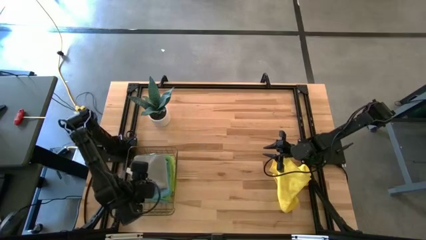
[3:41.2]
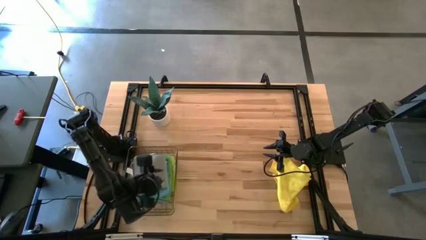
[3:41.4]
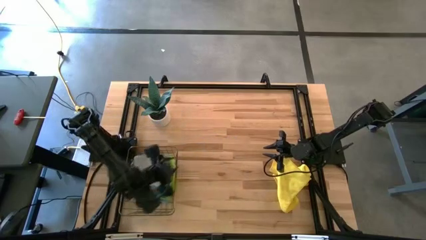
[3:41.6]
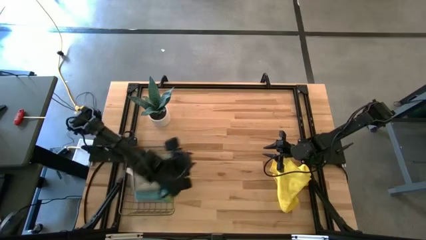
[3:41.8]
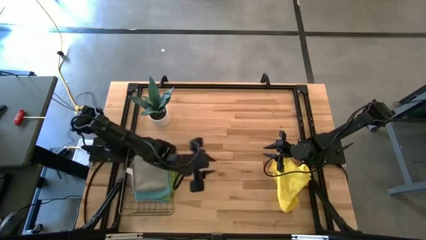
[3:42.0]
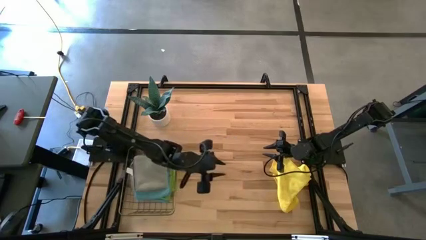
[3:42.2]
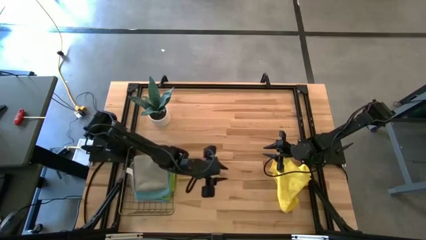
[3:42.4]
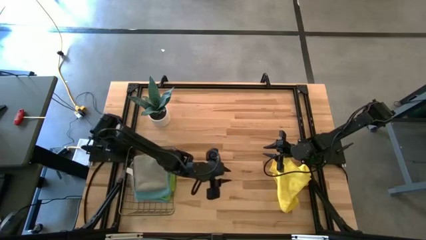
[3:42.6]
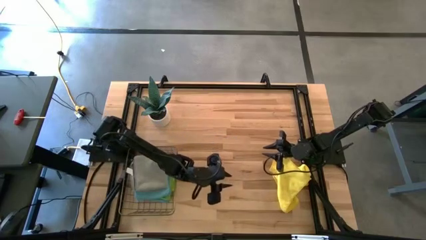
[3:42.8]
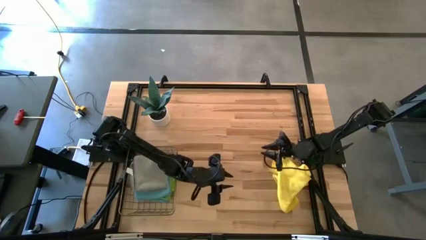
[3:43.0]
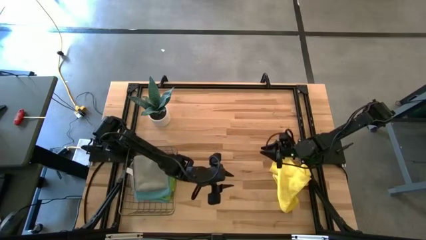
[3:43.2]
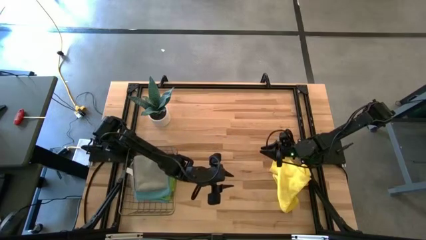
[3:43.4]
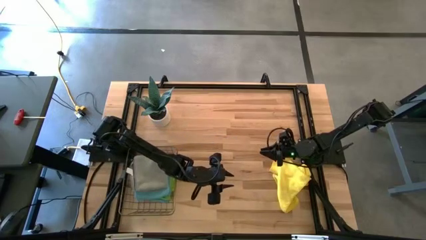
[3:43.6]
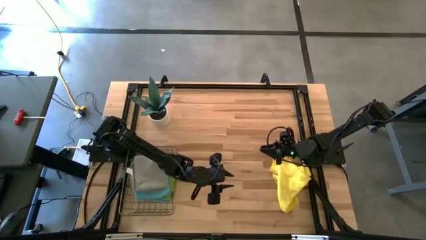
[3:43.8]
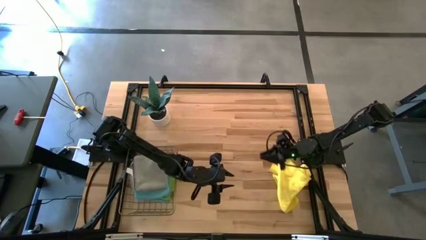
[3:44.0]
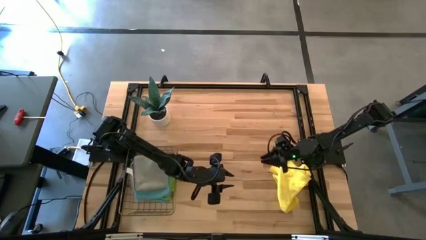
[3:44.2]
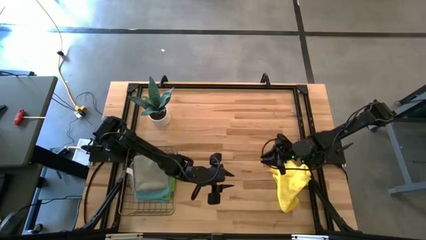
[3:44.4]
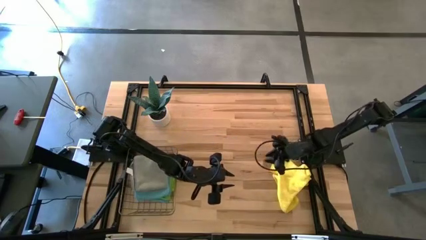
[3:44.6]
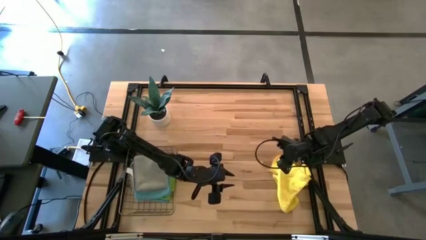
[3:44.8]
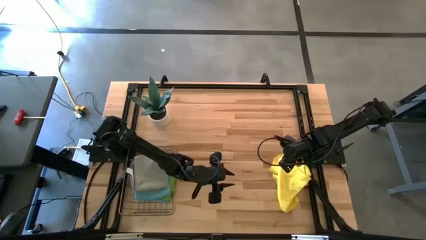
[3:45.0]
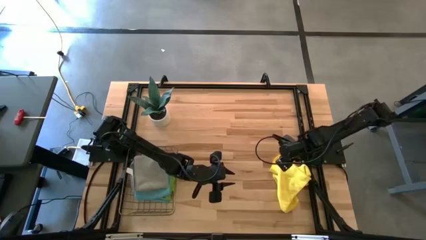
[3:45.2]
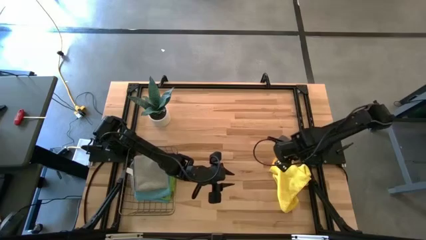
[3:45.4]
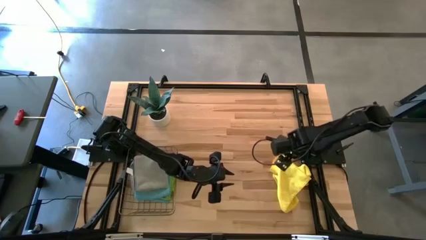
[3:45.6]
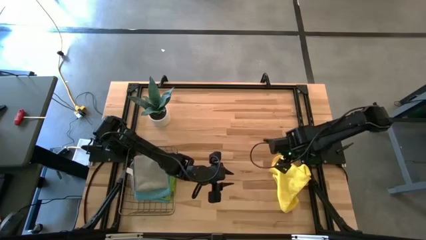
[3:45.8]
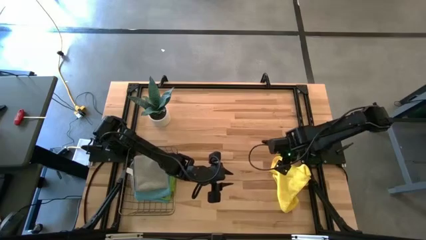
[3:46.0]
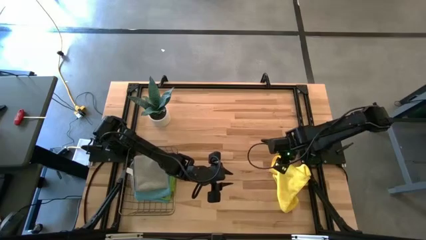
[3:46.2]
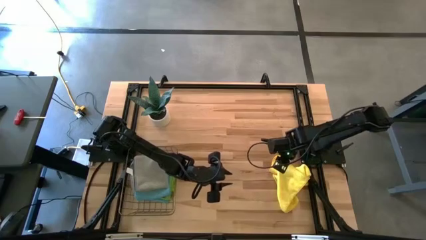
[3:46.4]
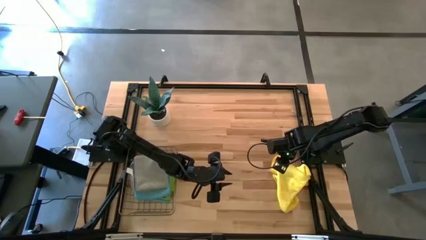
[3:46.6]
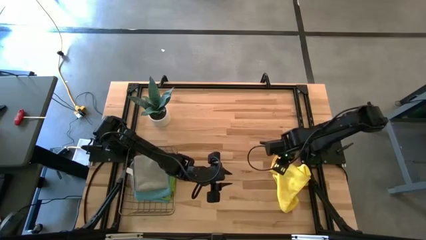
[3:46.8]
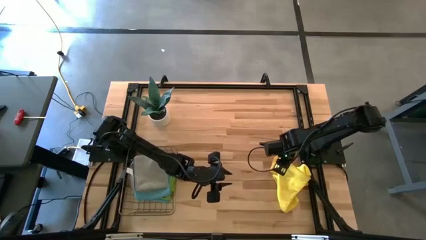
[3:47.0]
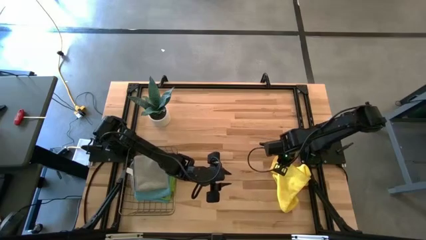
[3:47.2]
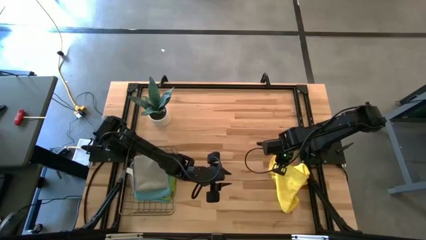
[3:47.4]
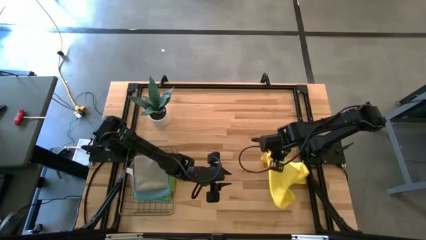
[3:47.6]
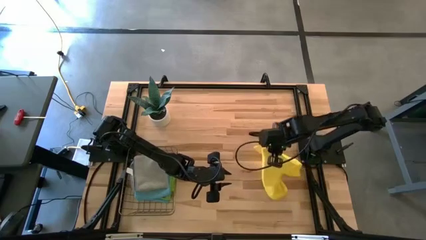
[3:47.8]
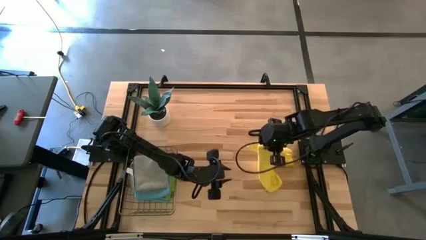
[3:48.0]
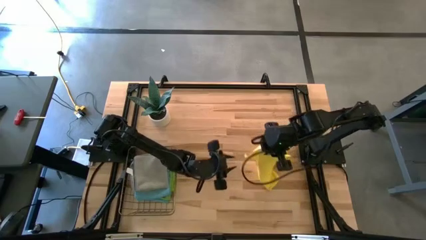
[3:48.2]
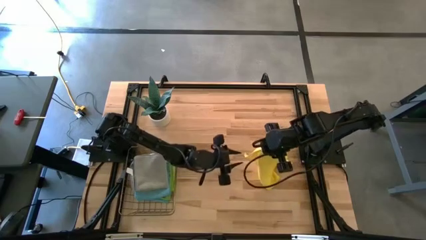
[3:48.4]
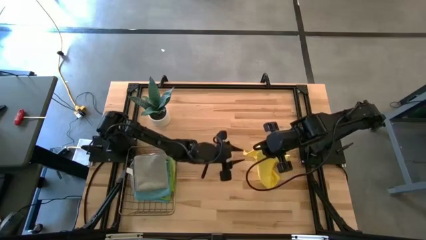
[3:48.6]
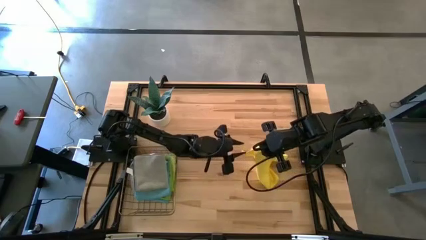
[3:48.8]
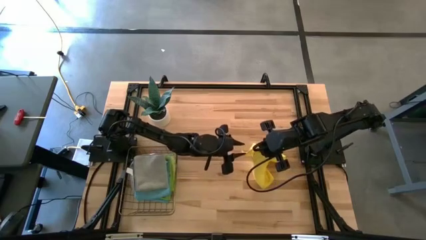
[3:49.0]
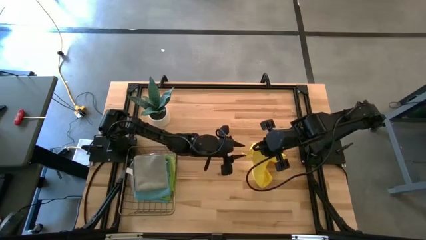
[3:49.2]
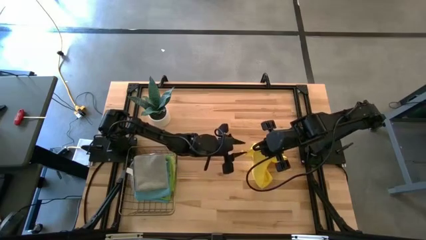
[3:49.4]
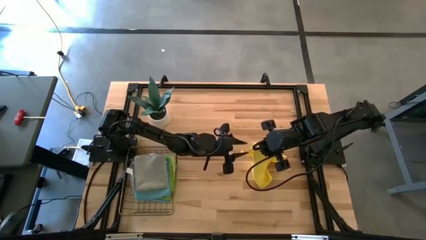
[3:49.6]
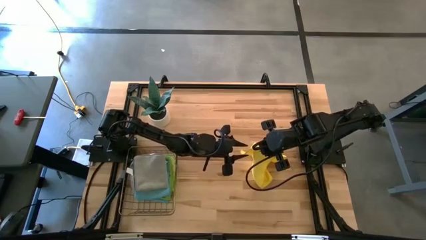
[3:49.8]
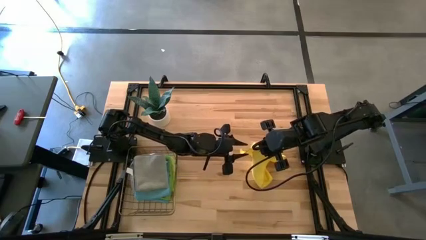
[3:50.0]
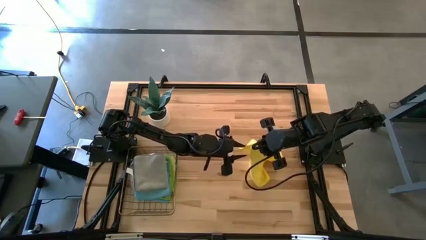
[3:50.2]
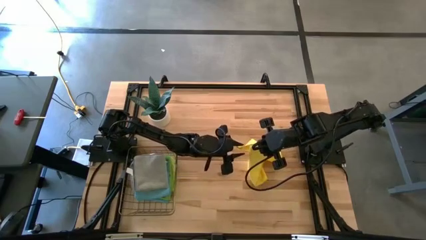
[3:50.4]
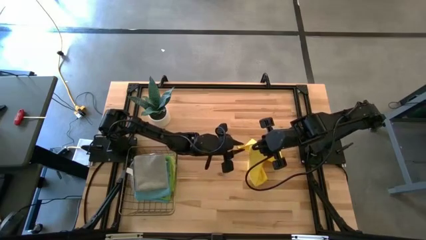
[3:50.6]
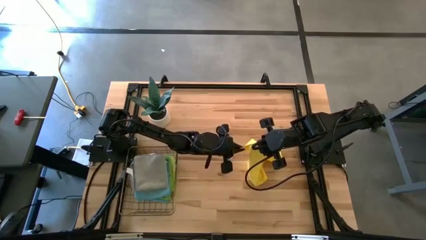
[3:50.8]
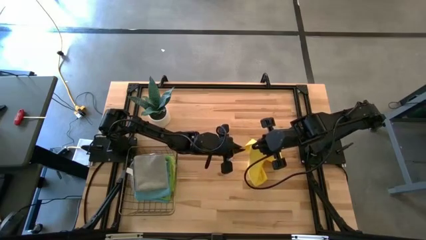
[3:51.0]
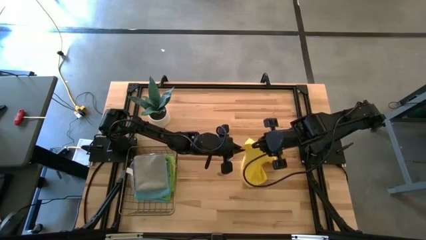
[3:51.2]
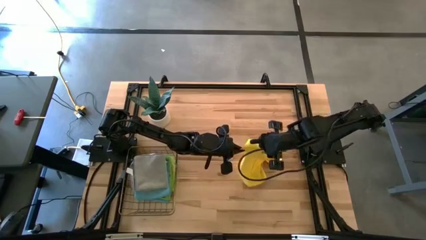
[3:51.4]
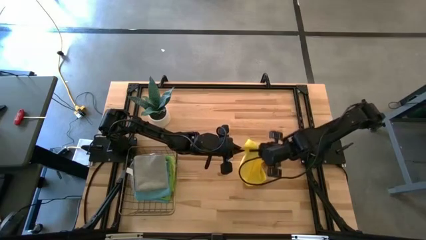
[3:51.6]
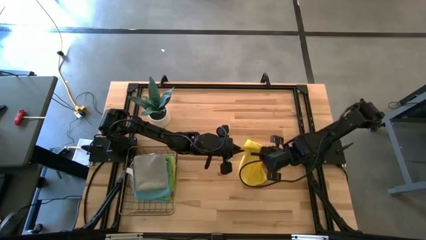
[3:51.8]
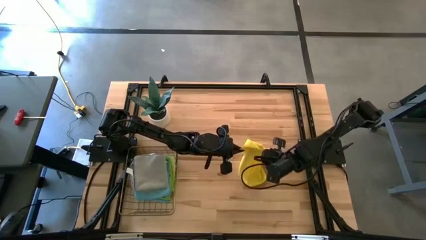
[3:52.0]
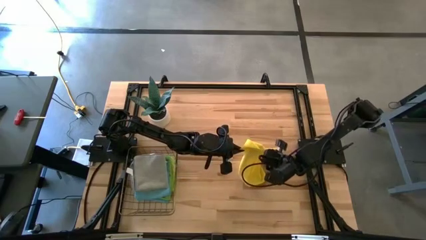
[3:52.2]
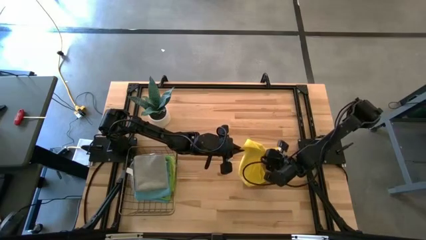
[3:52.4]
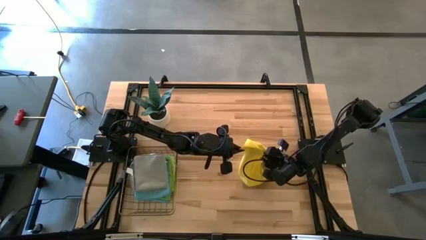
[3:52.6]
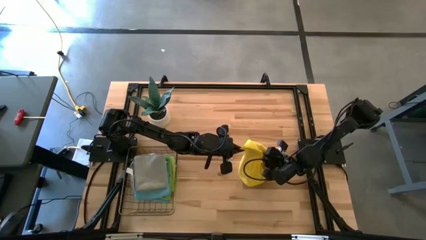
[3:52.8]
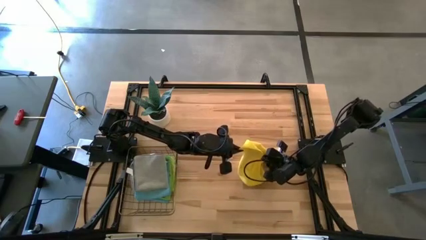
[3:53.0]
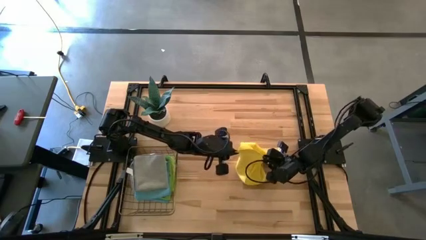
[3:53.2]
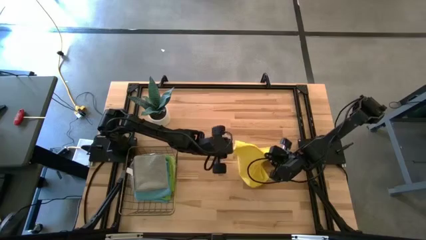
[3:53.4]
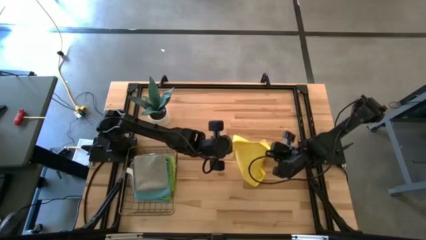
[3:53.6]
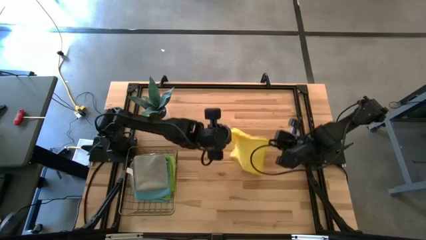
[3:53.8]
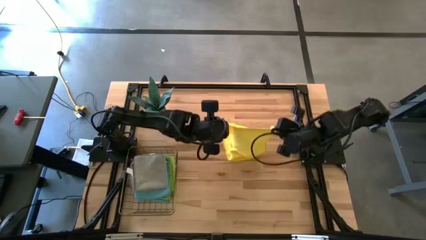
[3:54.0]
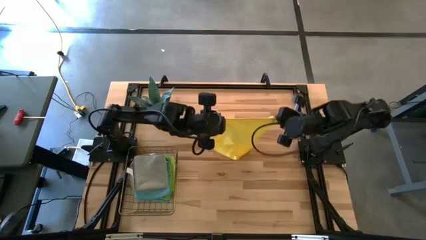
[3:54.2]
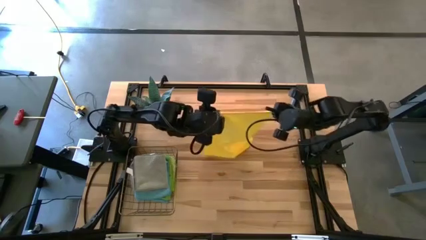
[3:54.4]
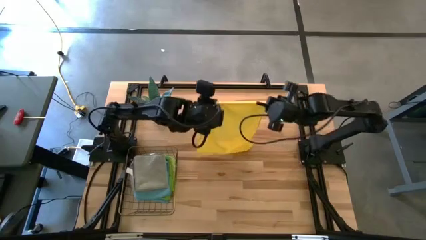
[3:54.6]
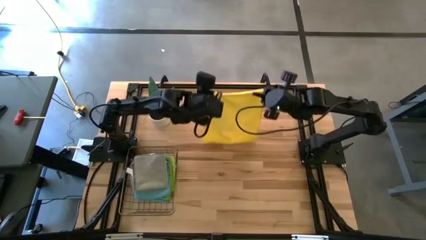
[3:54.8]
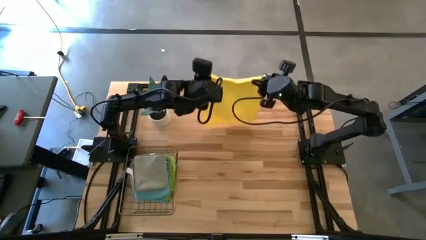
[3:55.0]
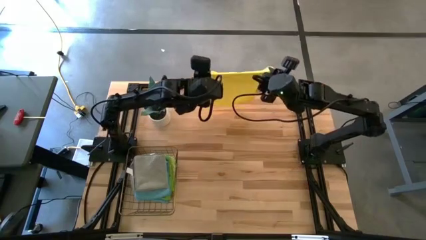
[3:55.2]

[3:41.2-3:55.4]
Task: Fold microfiber towels
Fold the yellow microfiber towel
